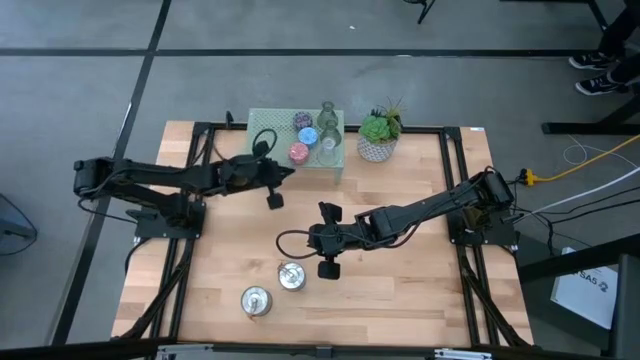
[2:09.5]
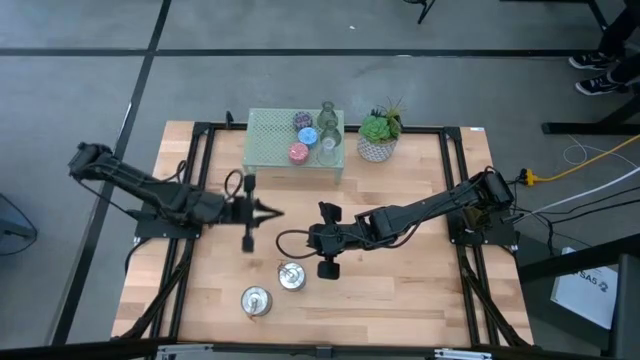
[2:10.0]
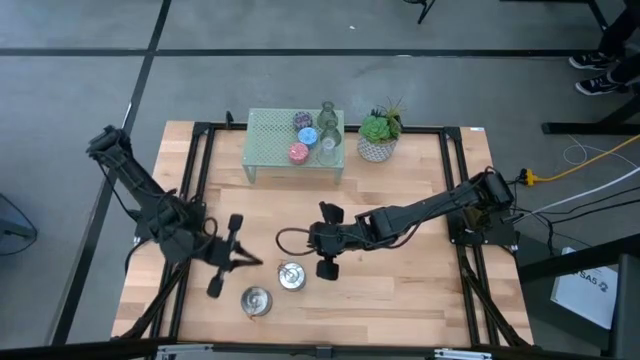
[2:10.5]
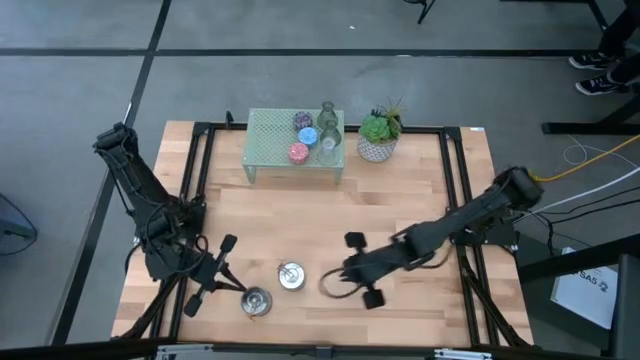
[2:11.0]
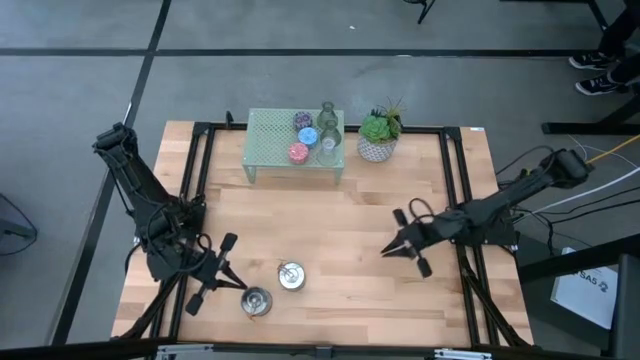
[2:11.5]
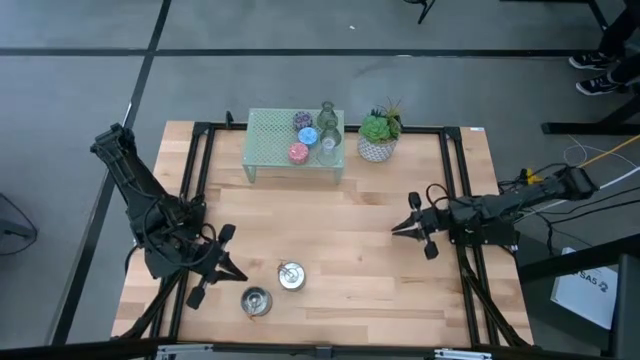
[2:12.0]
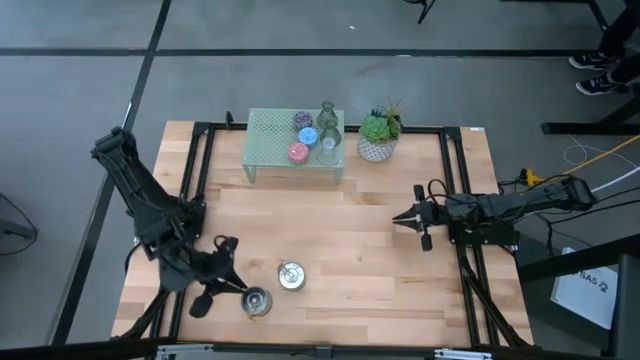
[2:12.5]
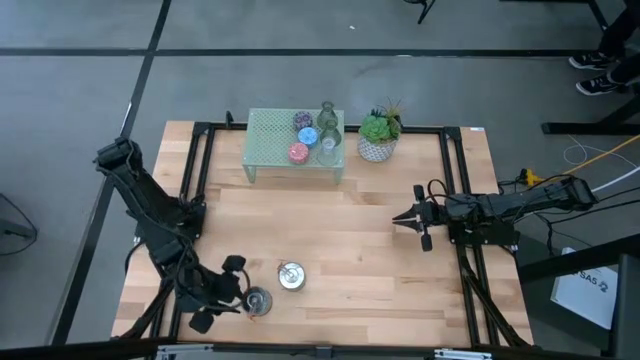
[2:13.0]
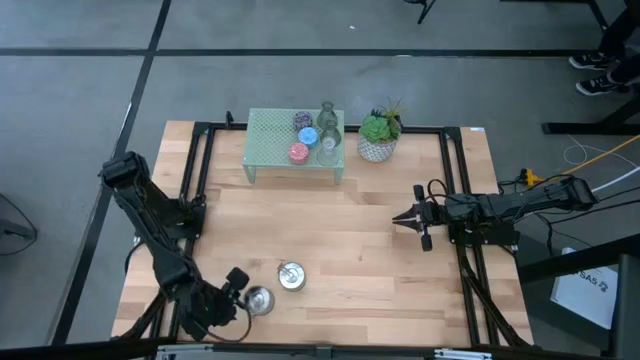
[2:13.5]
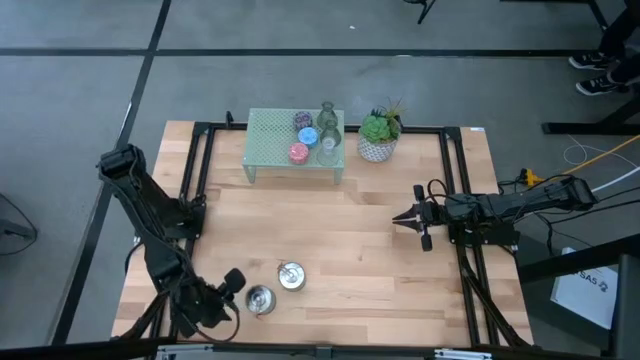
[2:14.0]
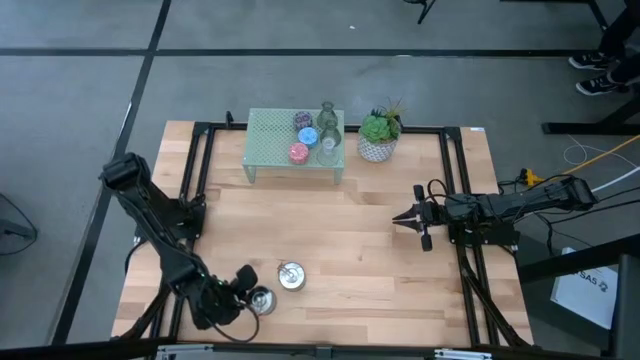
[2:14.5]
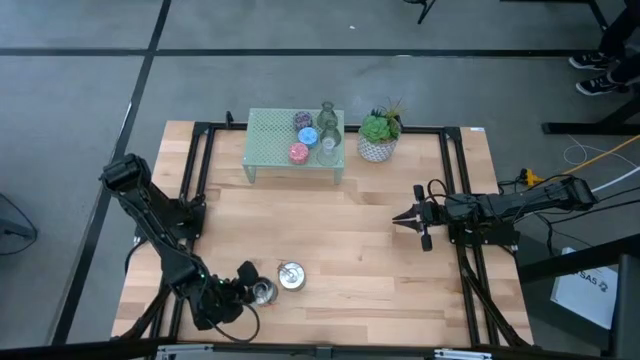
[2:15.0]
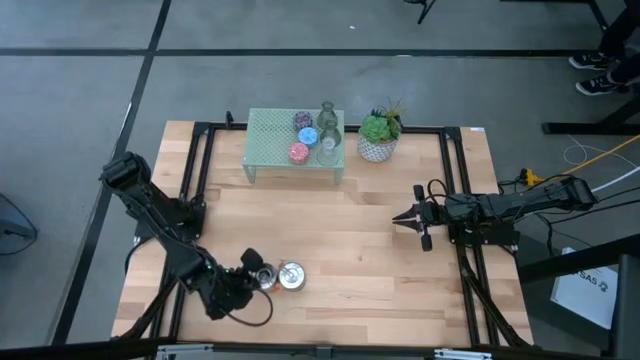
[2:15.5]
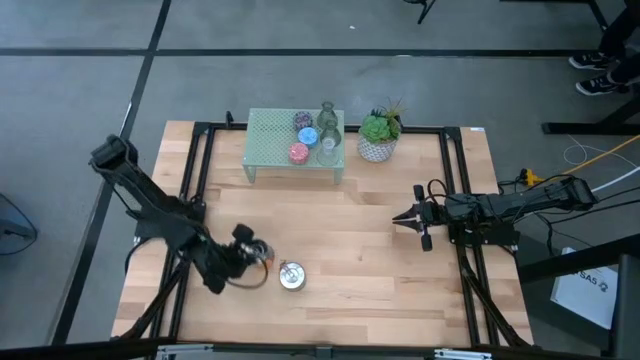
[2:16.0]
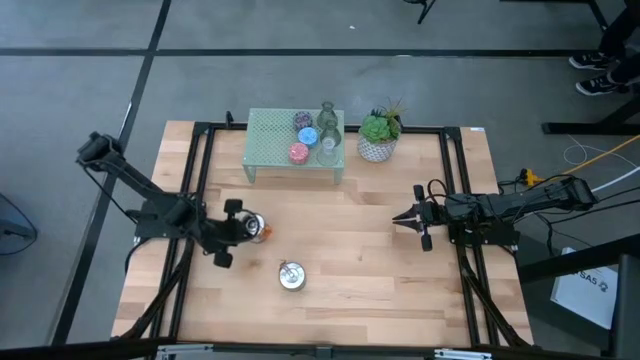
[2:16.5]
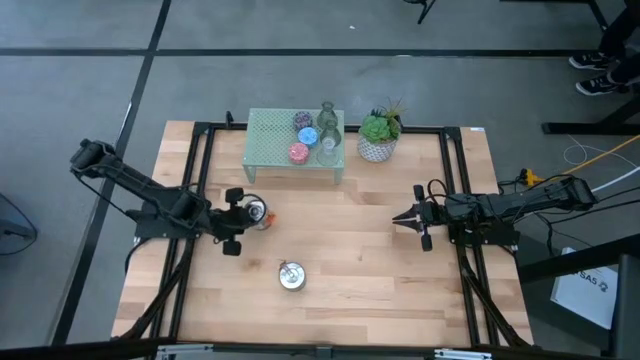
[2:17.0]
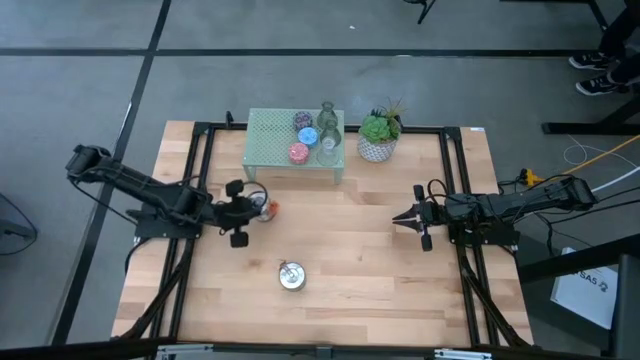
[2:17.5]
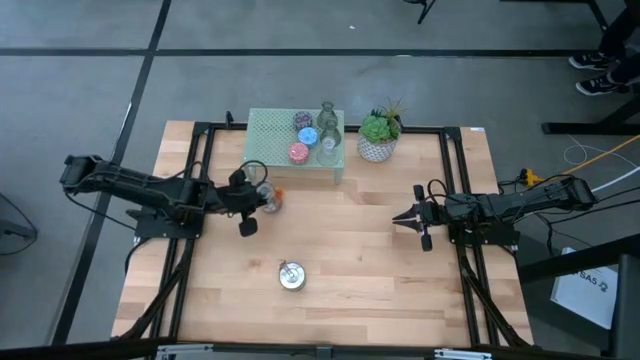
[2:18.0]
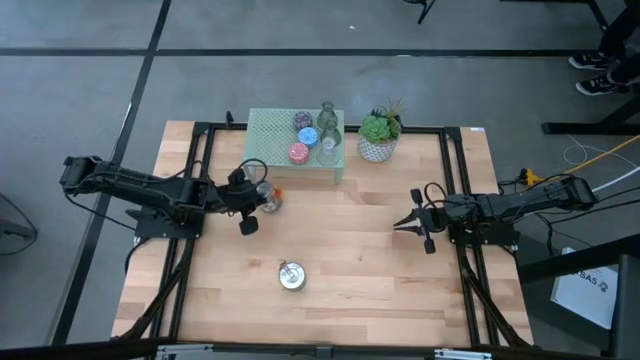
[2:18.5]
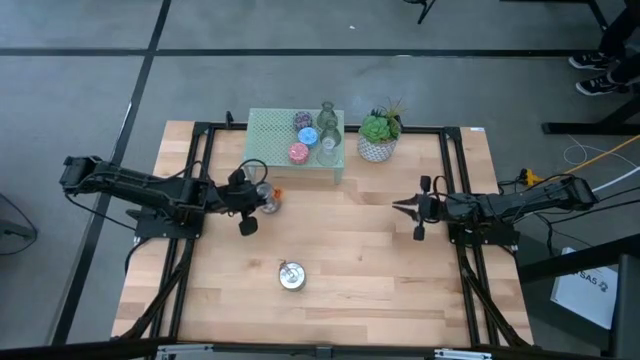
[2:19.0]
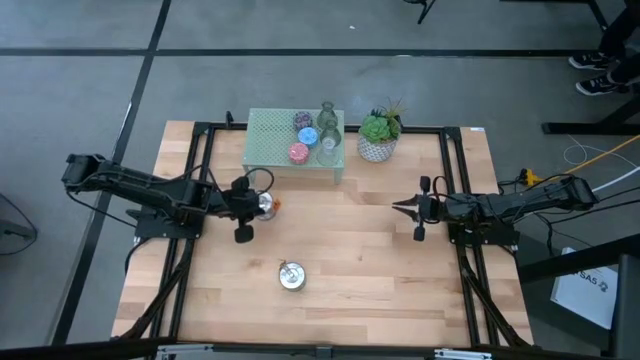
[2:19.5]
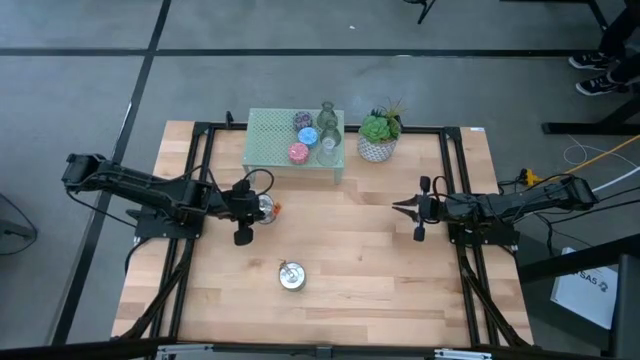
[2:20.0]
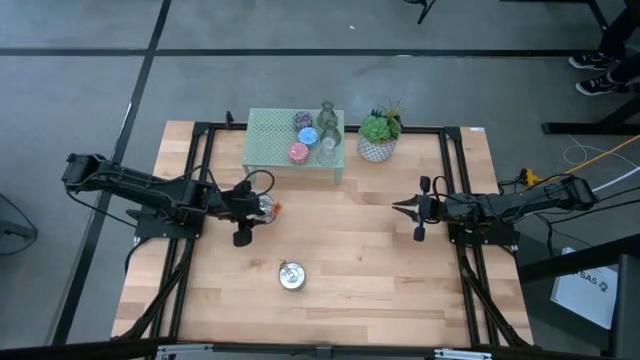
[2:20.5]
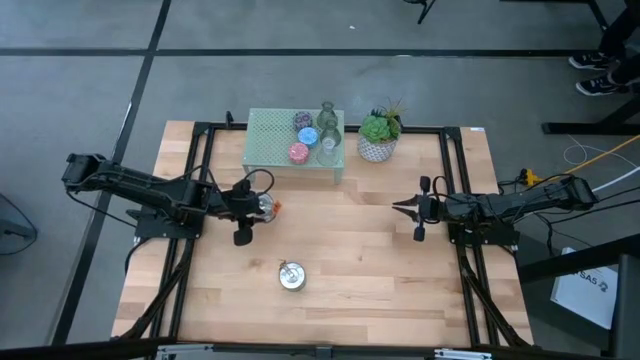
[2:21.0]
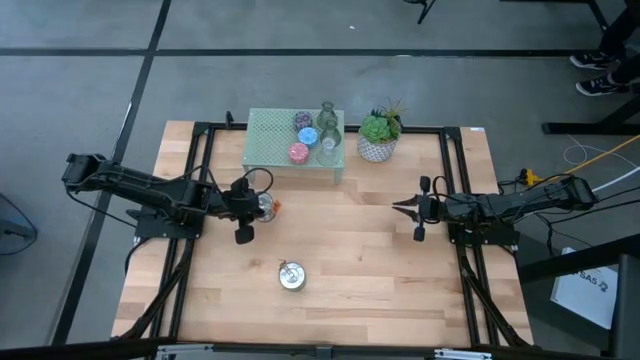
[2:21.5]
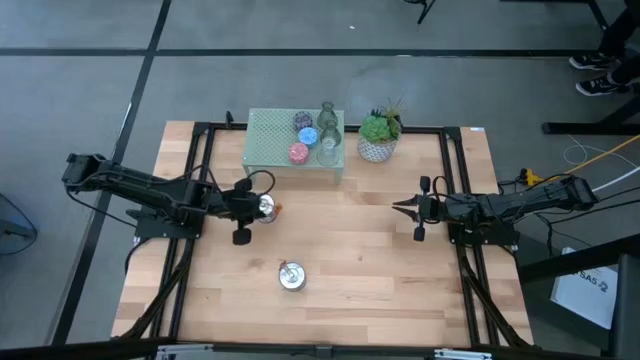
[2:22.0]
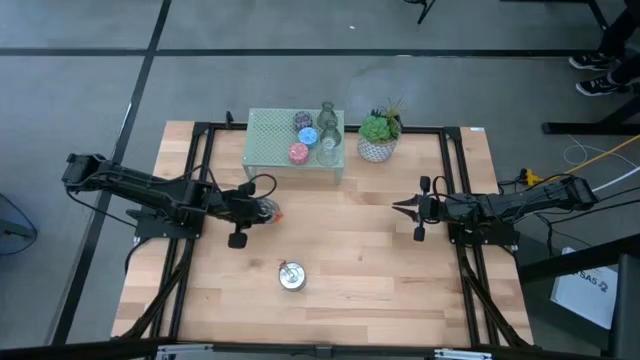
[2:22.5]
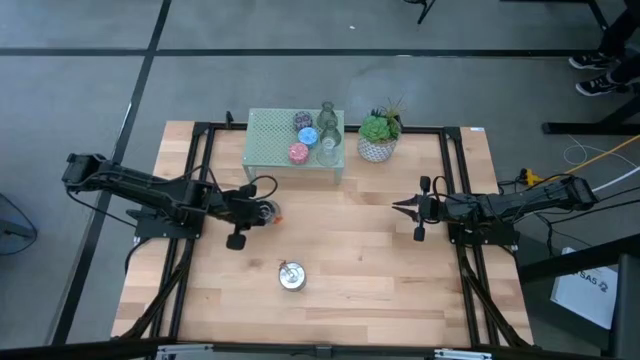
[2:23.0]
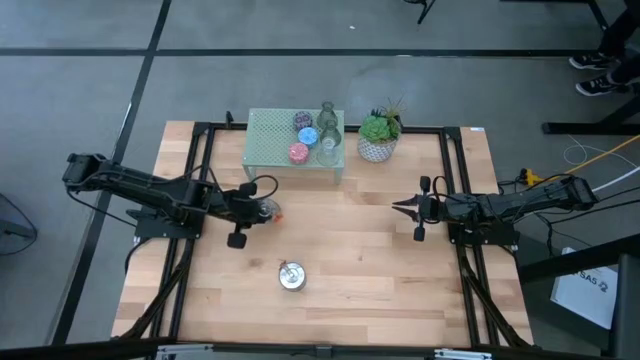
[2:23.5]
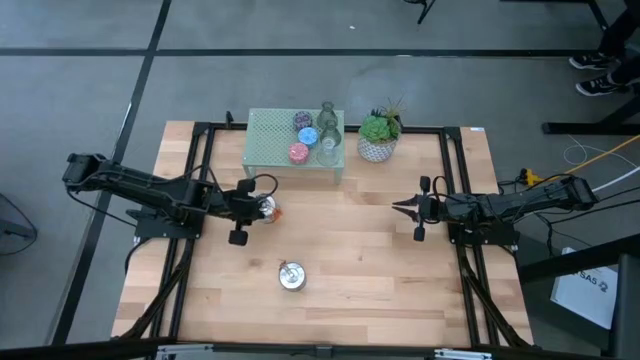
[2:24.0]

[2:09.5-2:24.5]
Task: Pick & Place candle stick holders
Put the silver candle can on the shelf

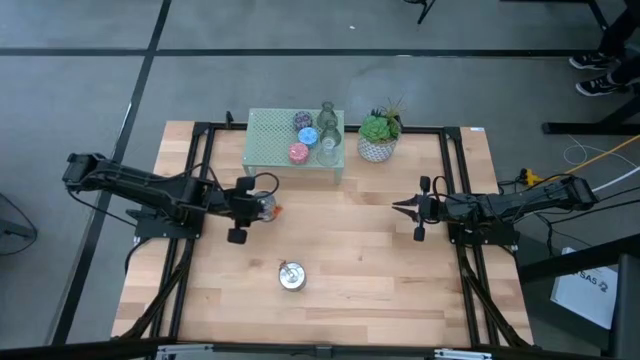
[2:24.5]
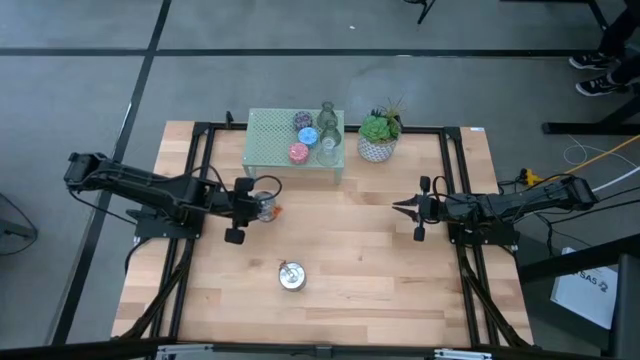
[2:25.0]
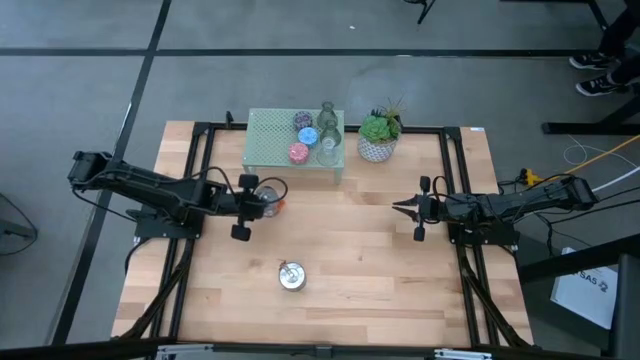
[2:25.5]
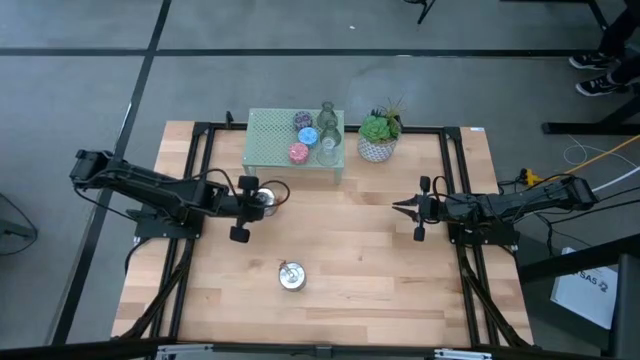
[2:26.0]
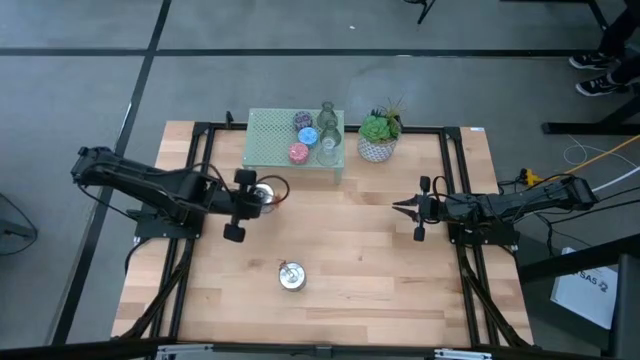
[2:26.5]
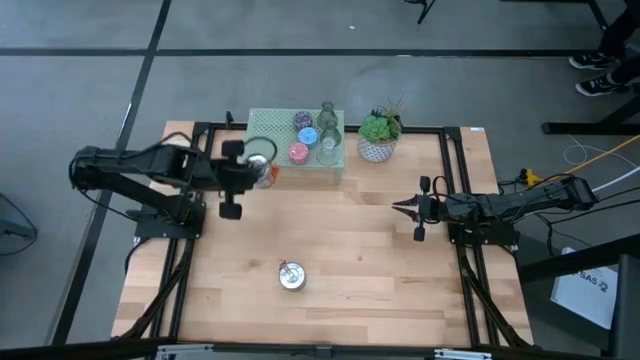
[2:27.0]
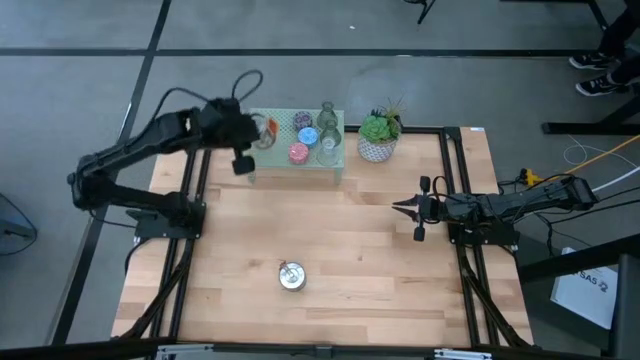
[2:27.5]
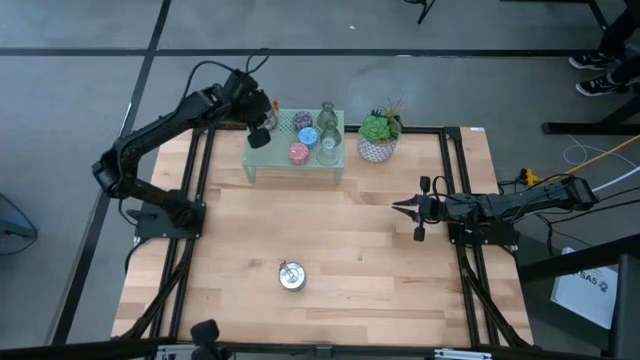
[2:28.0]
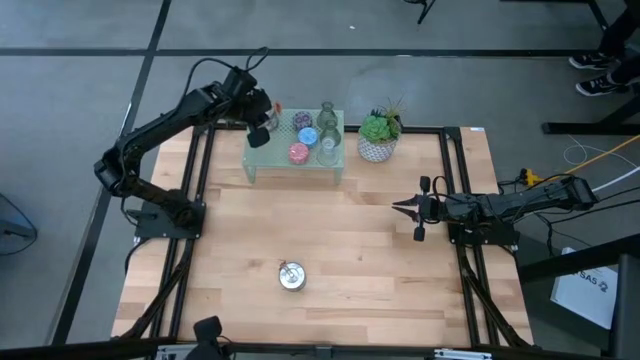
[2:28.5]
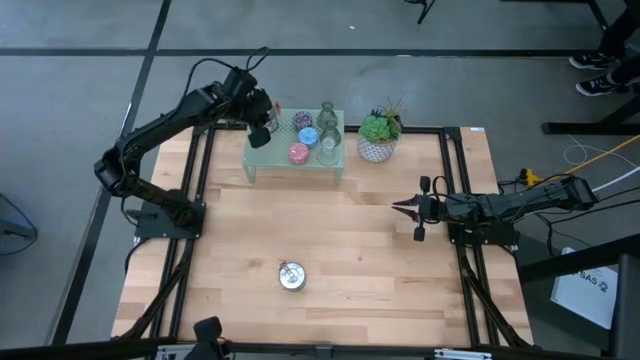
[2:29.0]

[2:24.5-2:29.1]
Put the silver candle can on the shelf
